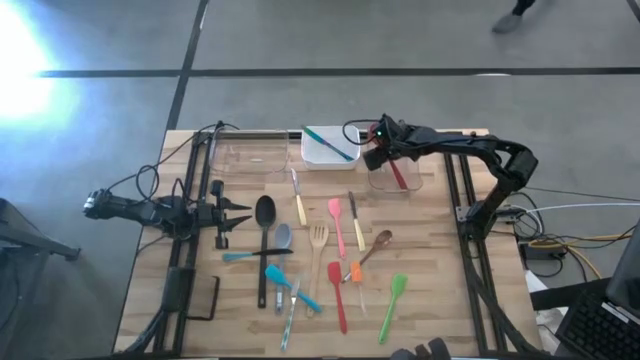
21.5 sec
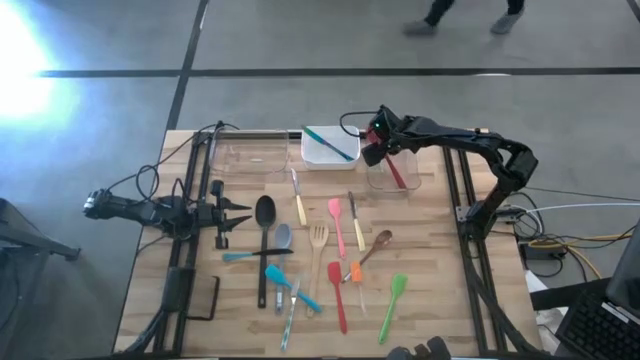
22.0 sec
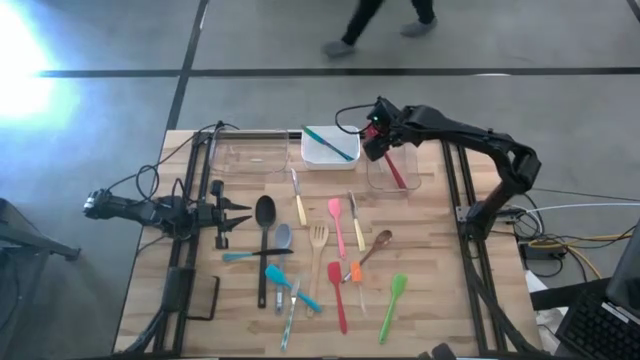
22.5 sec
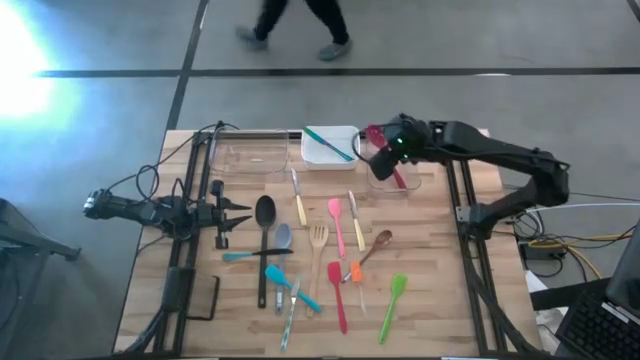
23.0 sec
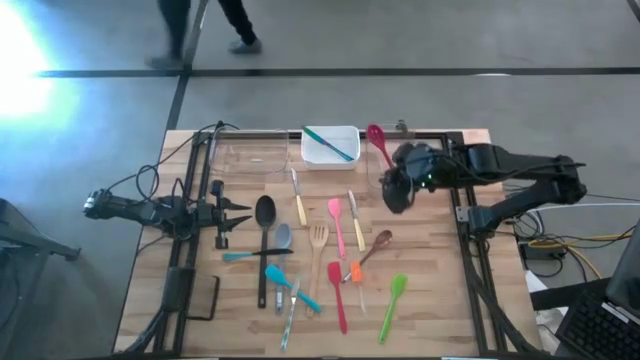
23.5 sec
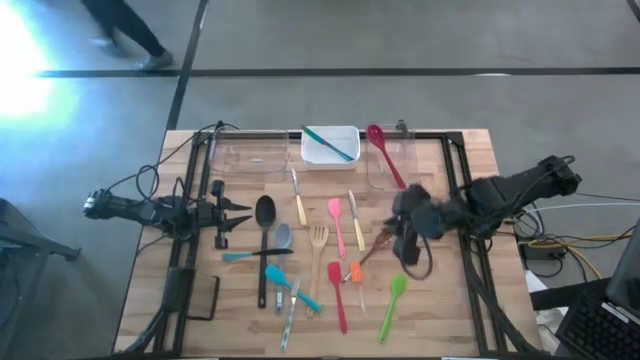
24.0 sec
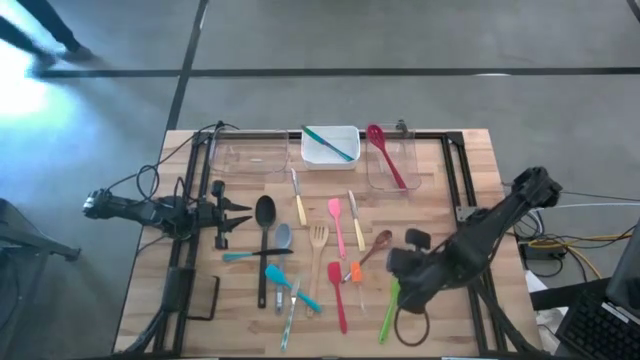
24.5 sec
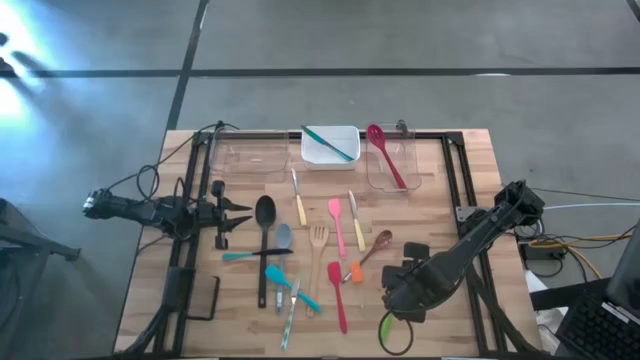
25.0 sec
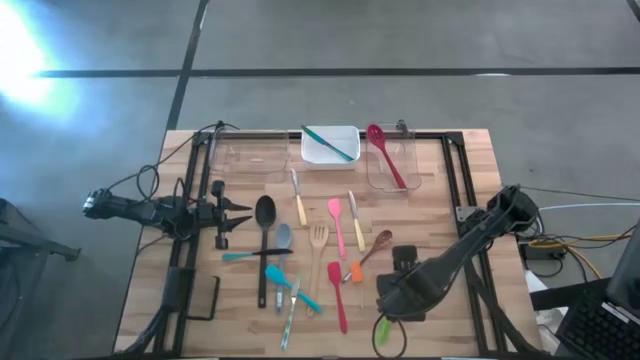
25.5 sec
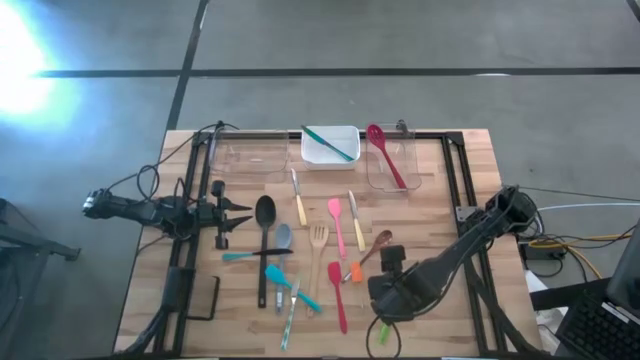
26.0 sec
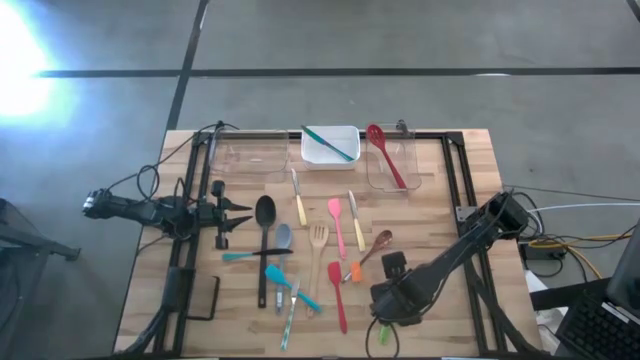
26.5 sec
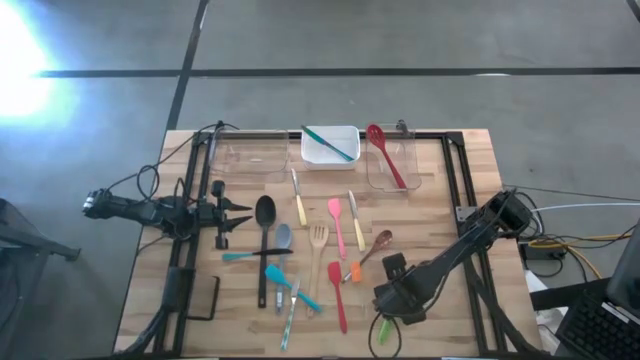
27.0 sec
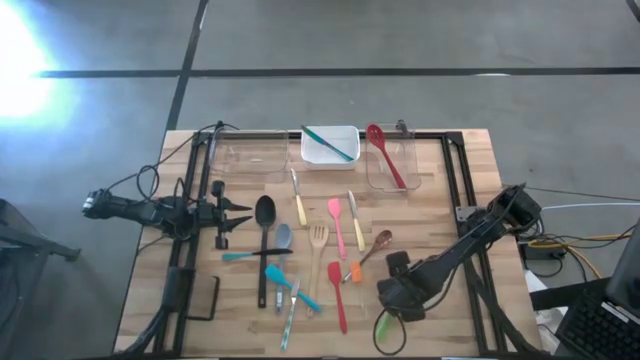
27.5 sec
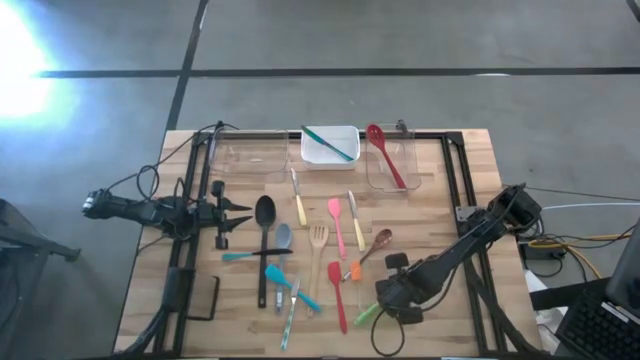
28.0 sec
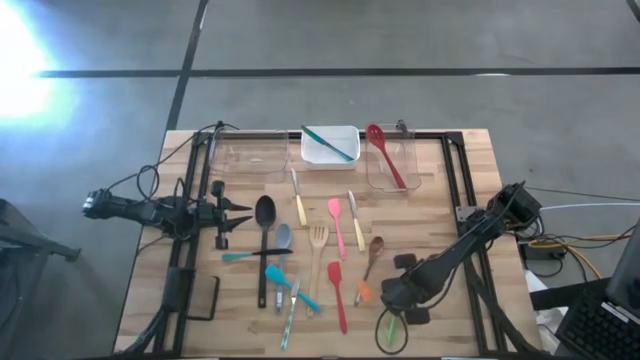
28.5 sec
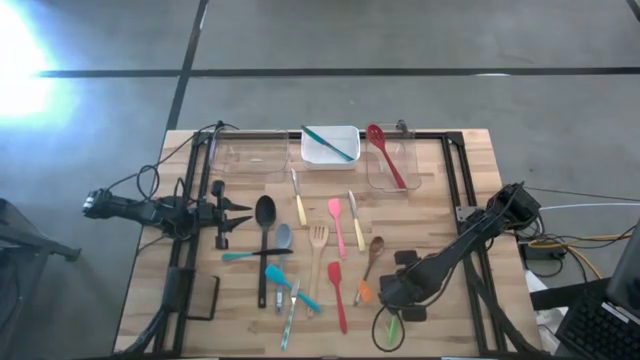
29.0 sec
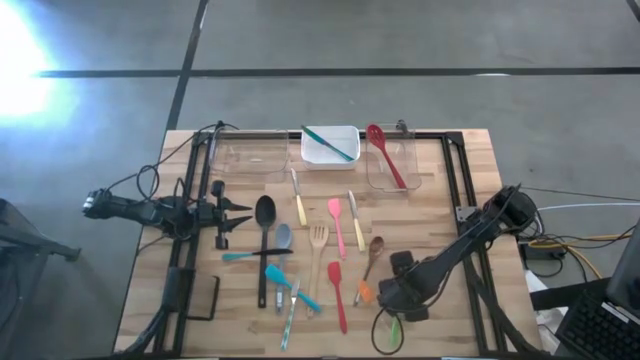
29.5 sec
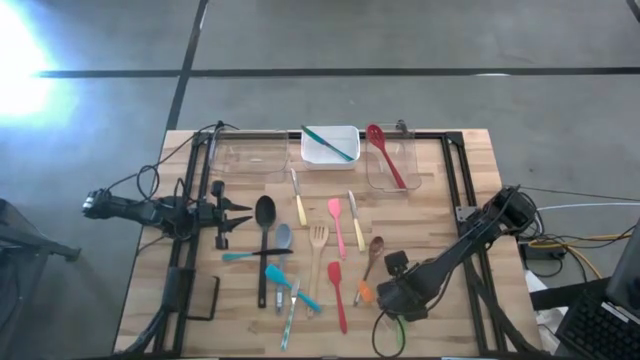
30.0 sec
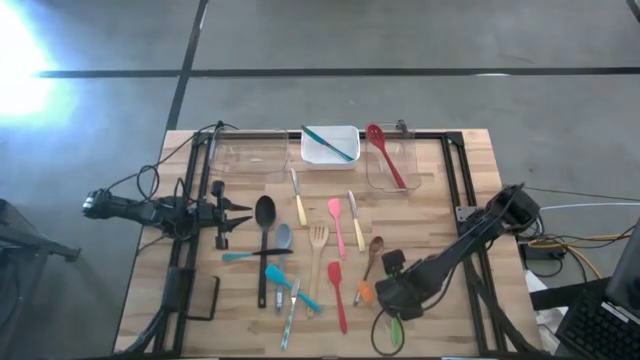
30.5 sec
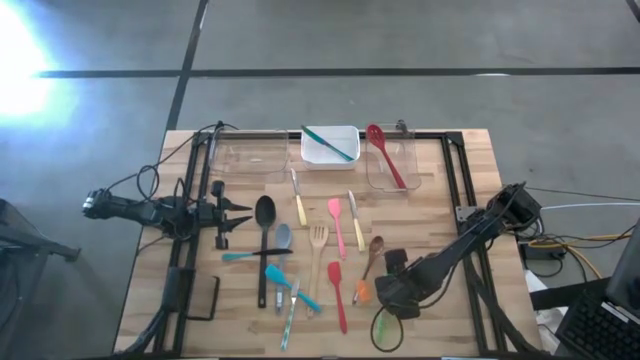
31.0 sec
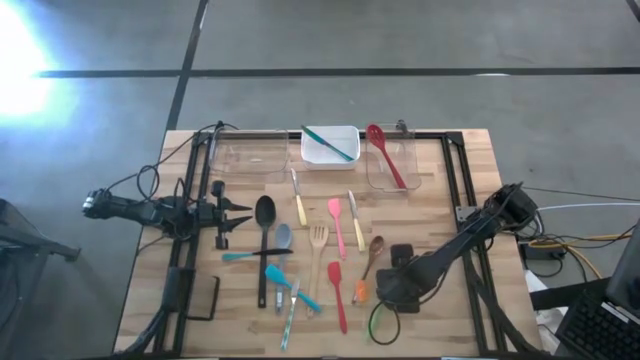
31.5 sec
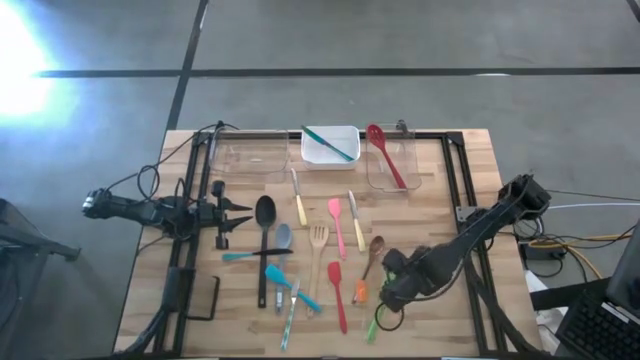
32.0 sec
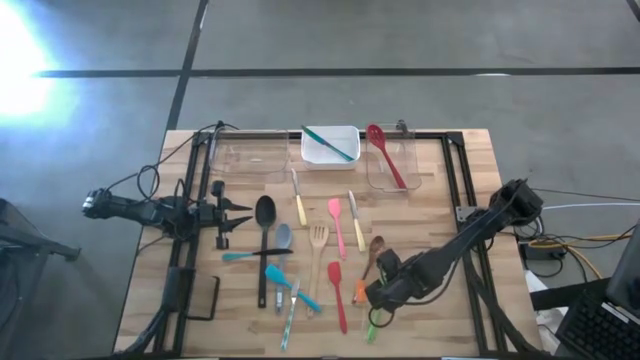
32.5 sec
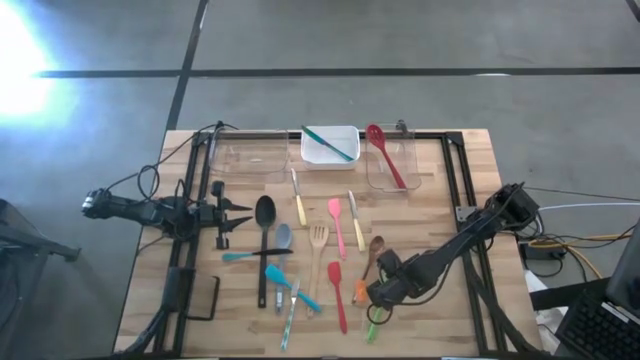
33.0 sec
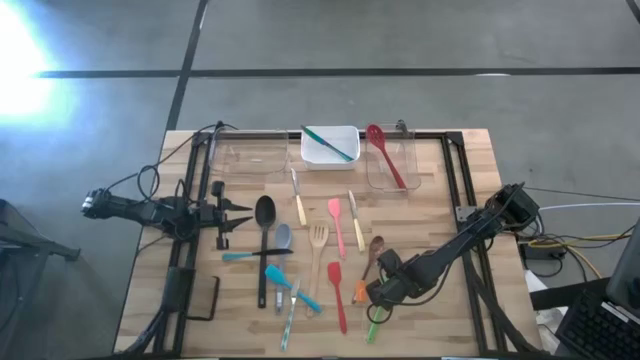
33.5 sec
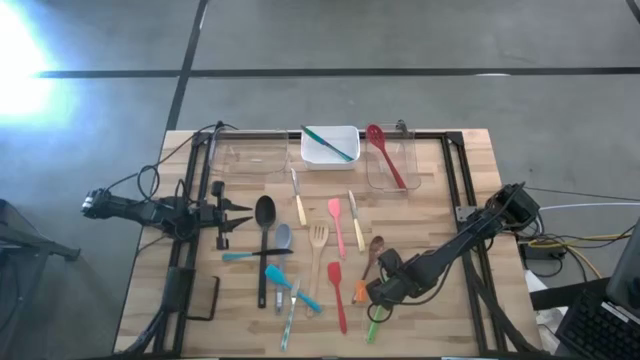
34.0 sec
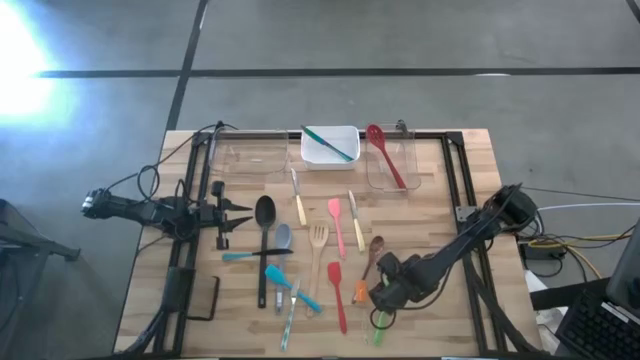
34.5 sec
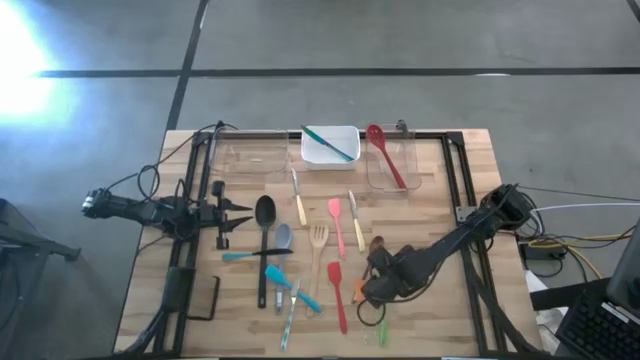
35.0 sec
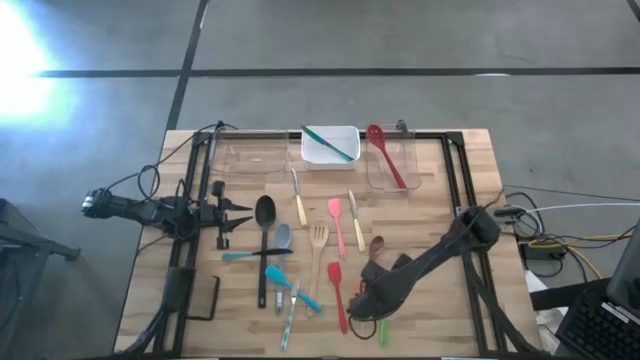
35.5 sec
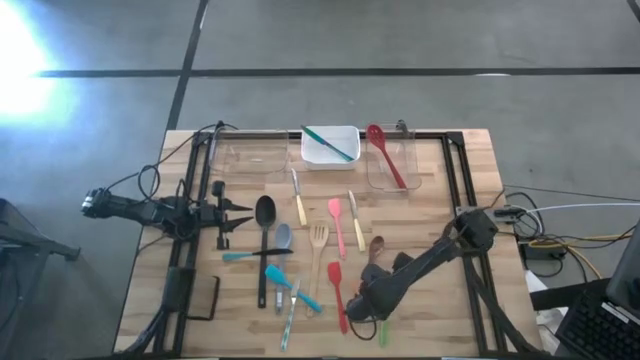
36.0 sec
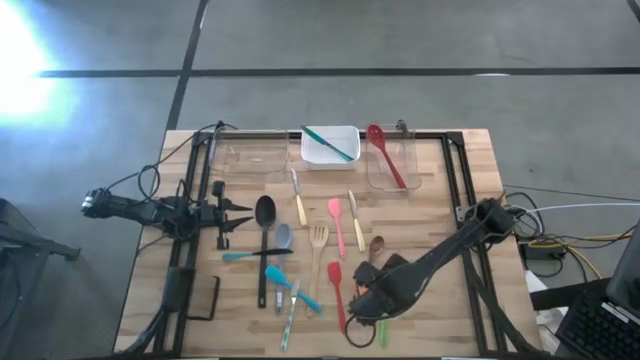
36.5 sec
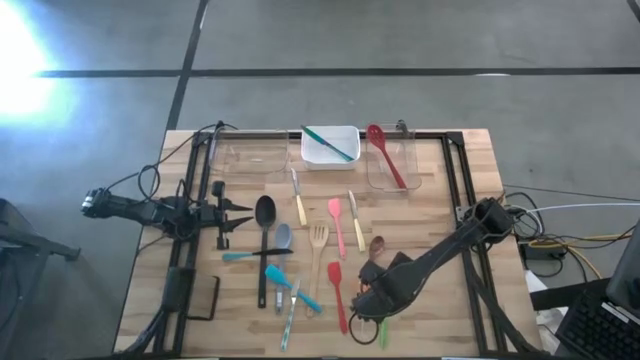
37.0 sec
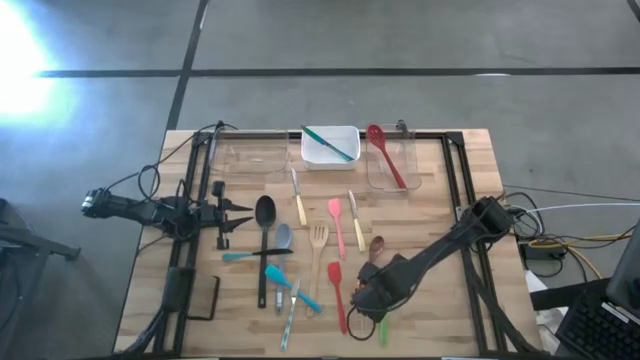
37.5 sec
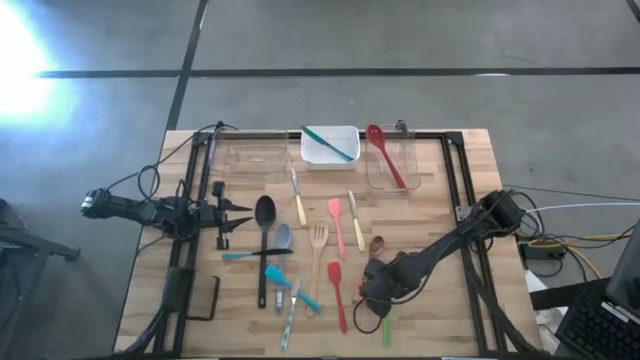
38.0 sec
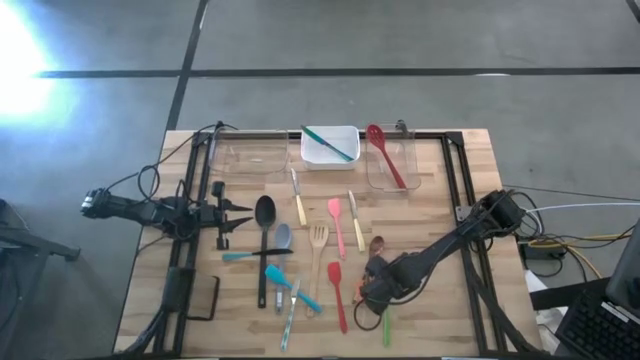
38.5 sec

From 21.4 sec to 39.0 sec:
Task: Pick & Place Kitchen Items
Put the green spatula into the left transparent bin

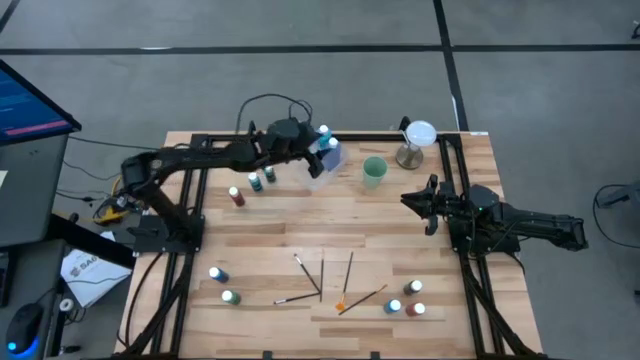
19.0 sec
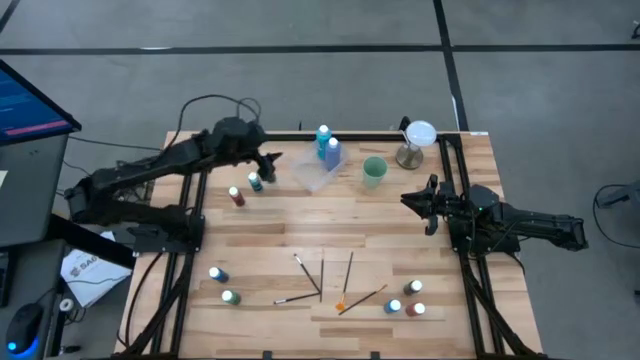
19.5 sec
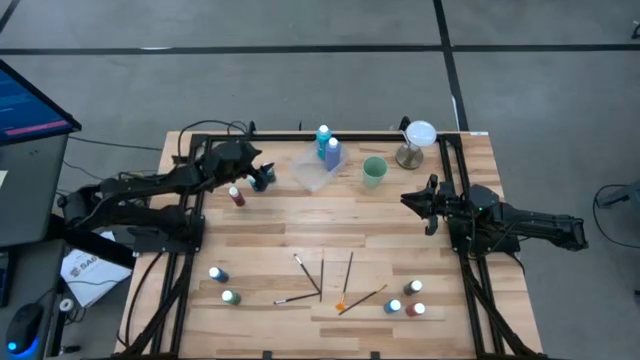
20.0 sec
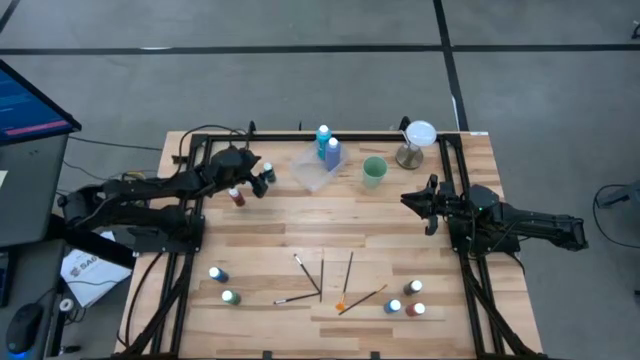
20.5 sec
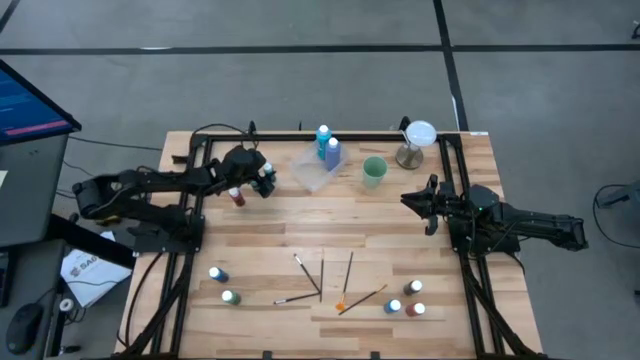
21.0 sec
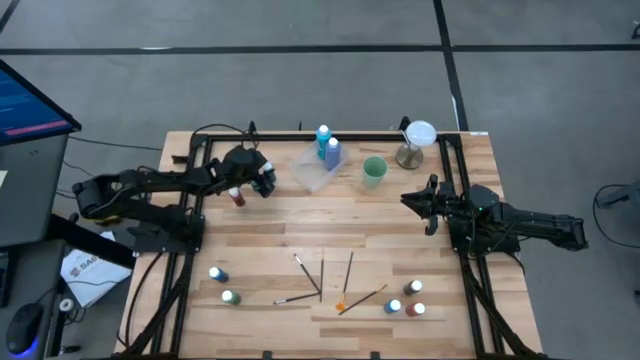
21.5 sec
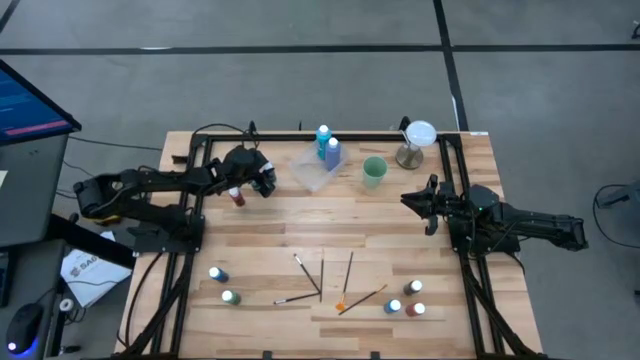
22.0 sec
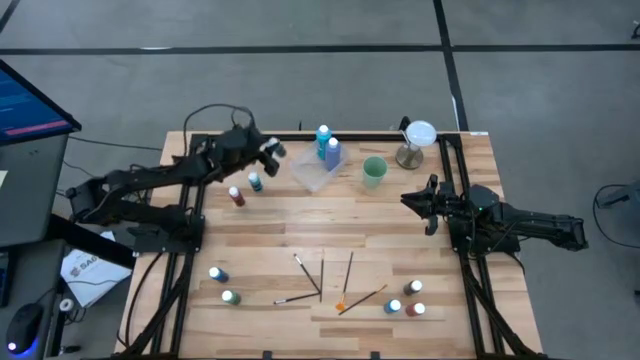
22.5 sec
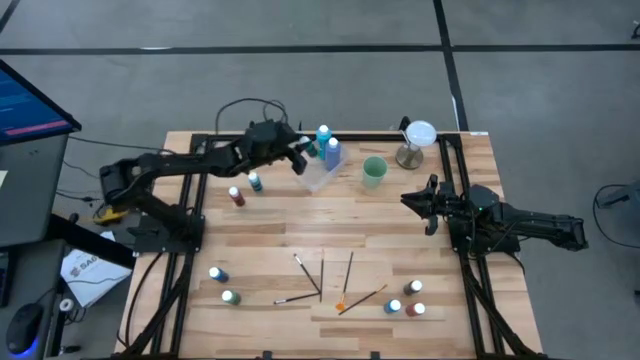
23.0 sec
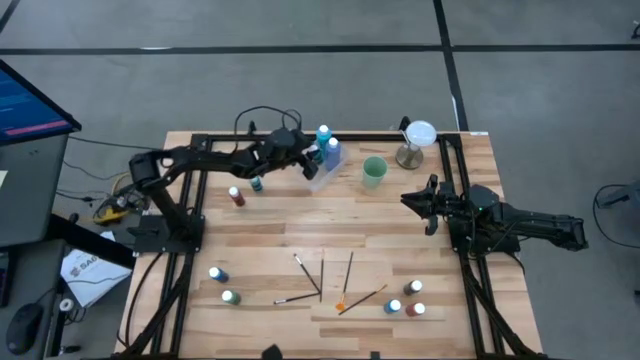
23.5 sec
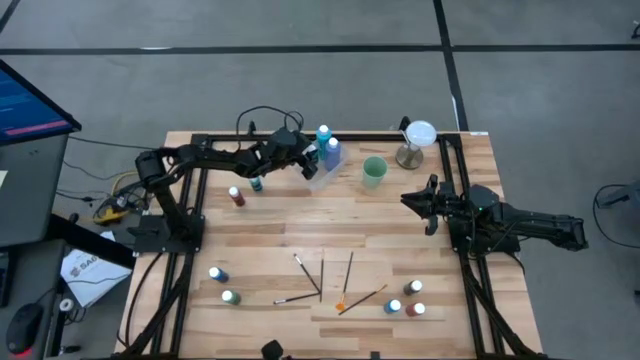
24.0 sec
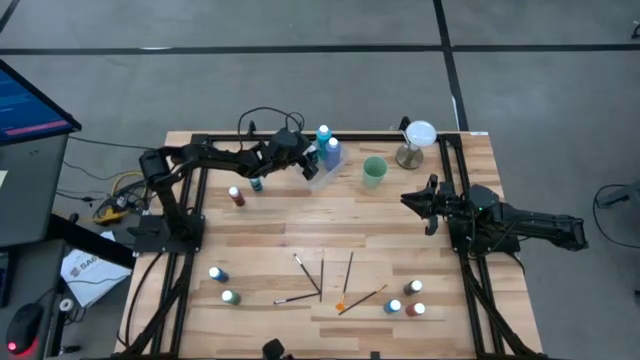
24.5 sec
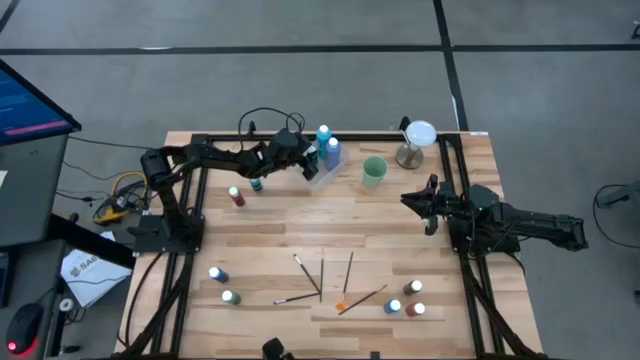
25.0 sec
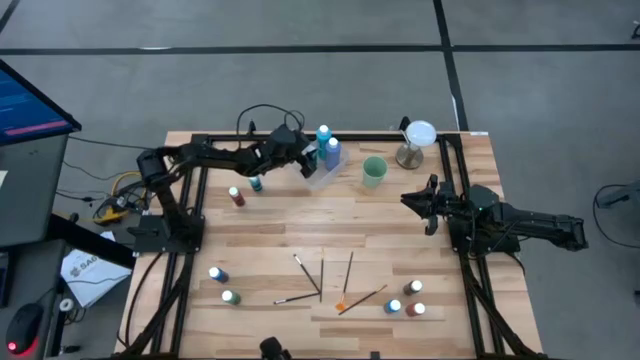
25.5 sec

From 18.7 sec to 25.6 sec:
Task: Pick & Place Paint Supplies
Put the top small green paint bottle into the transparent bin
